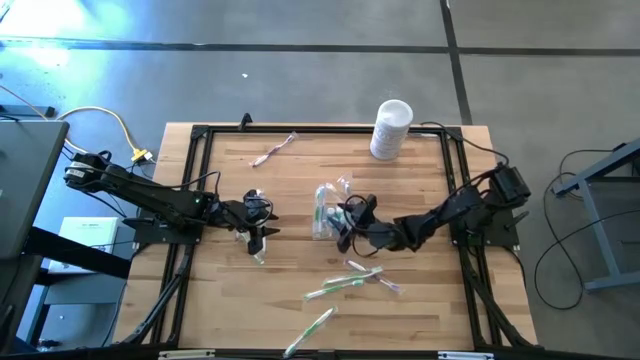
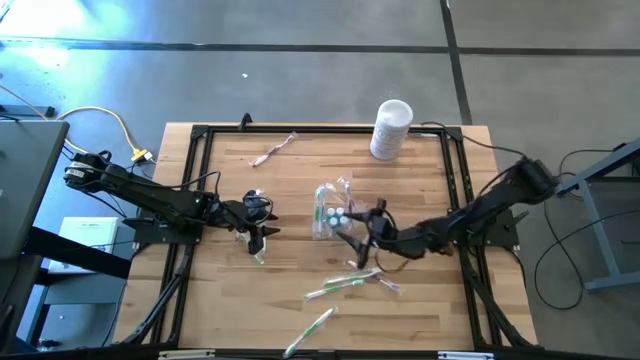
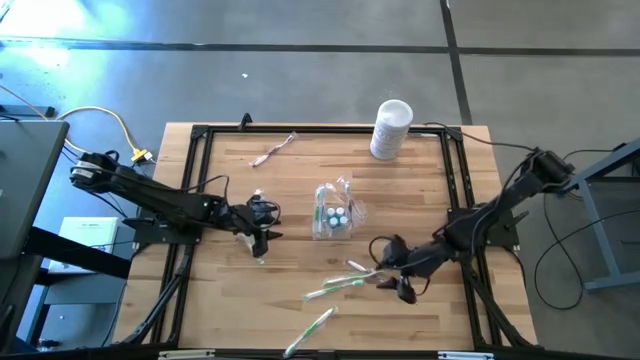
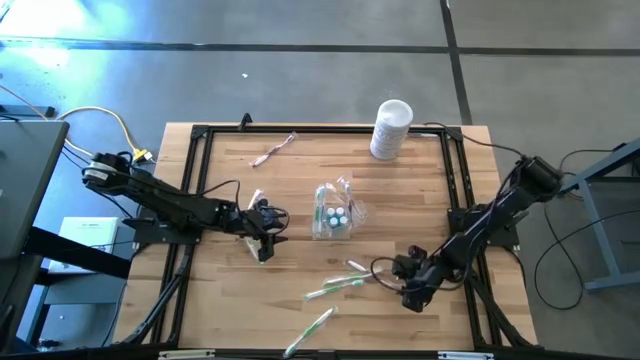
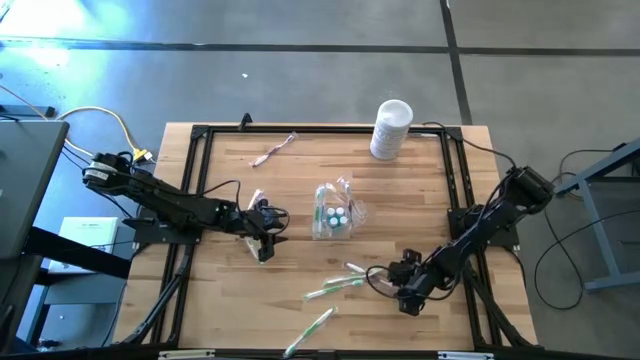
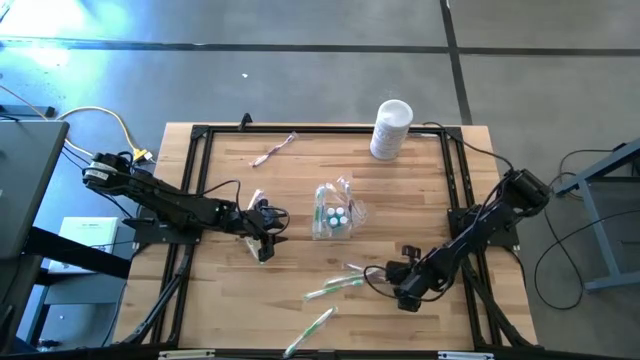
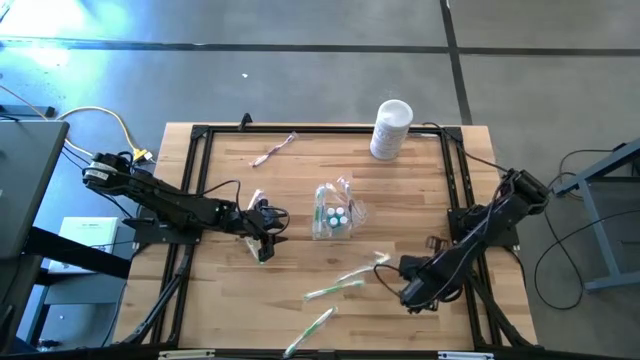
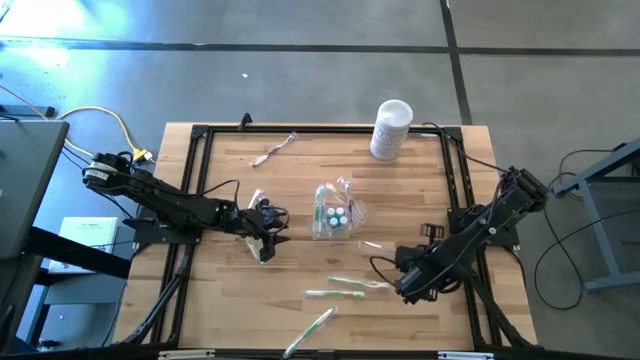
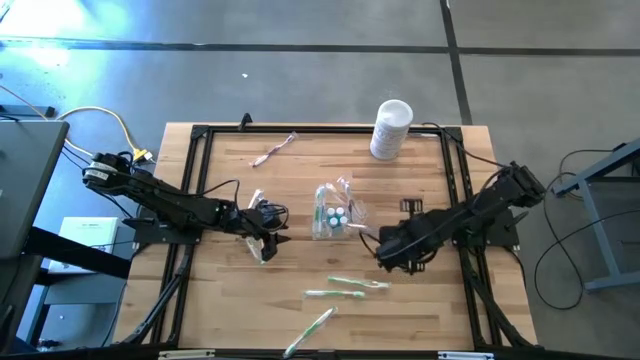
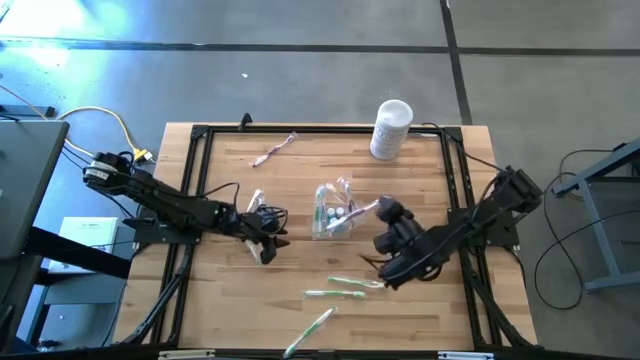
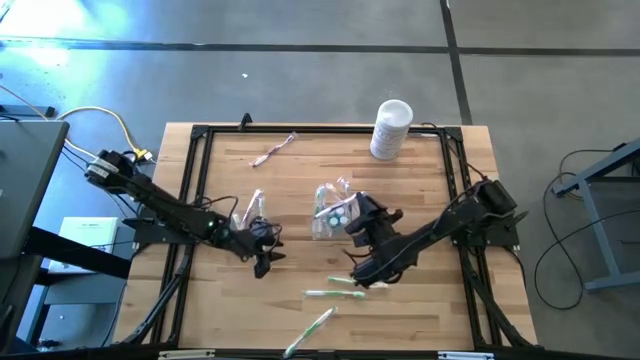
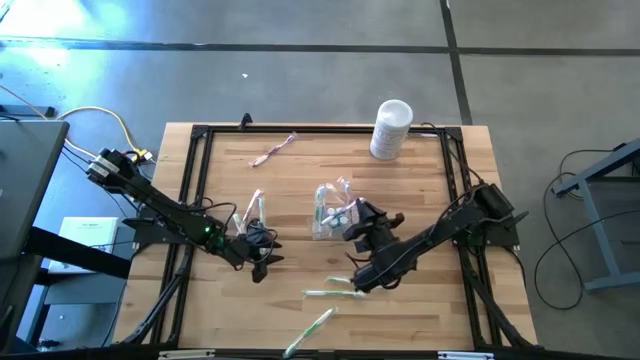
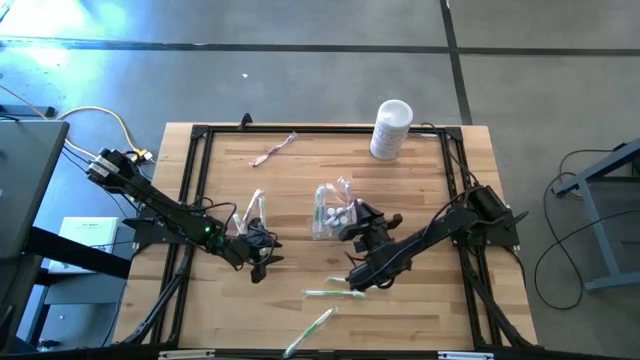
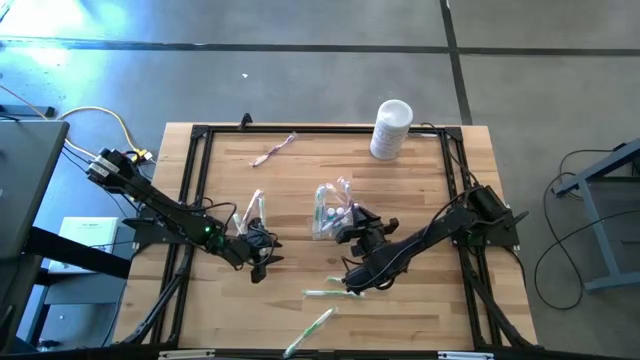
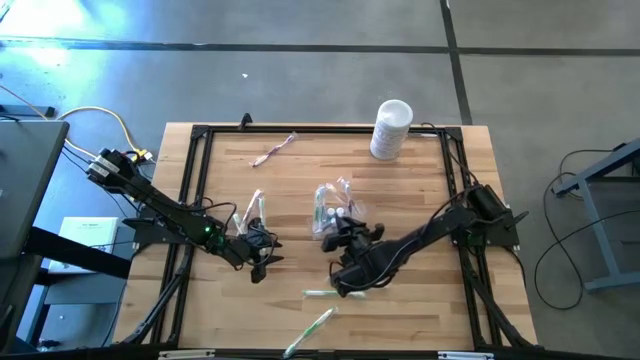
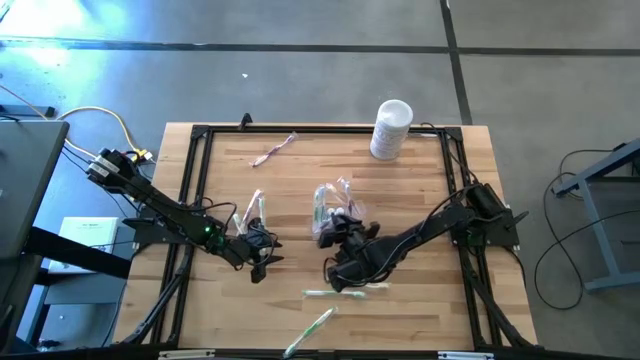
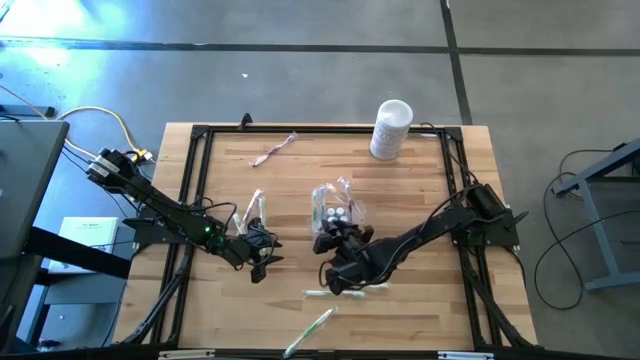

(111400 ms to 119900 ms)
Task: Pick & Place toothbrushing station
Put the violet toothbrush into the transparent organizer

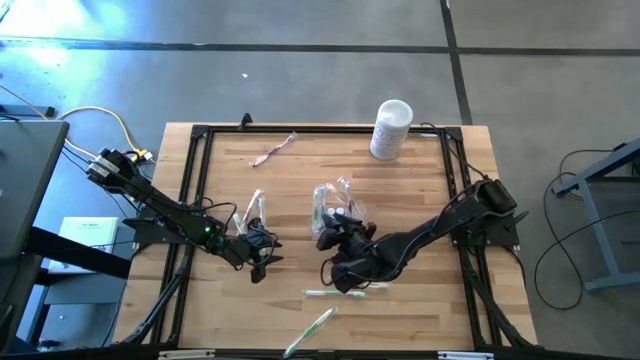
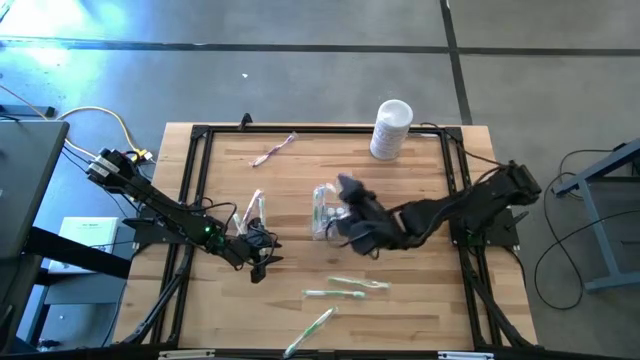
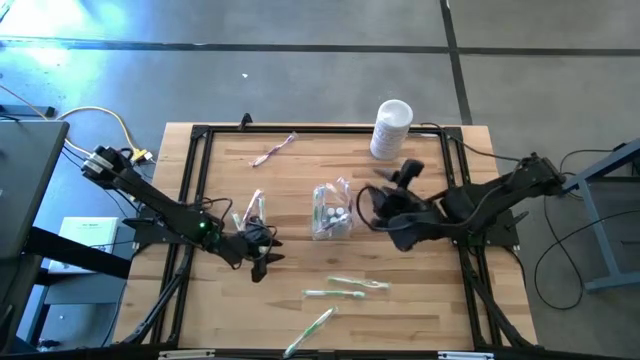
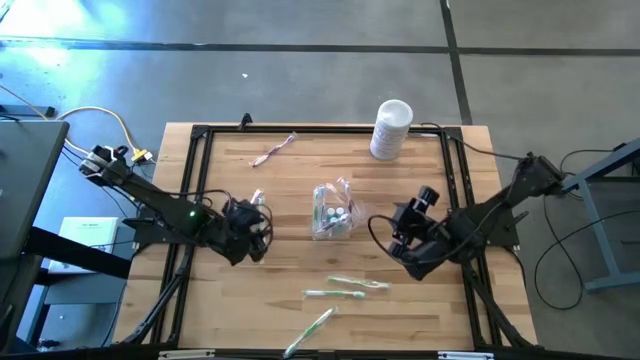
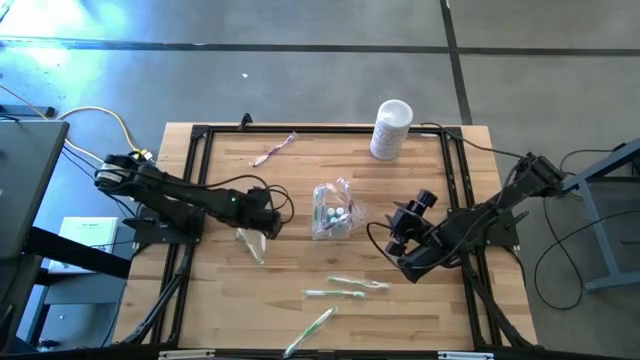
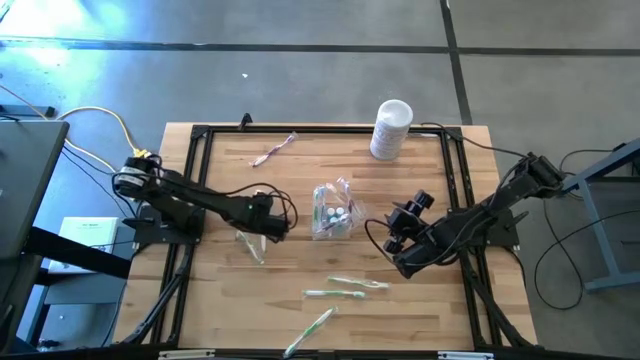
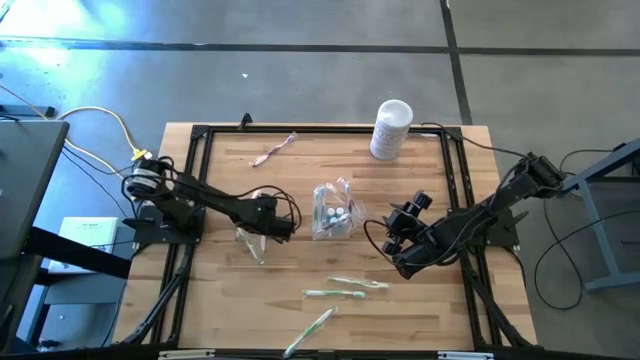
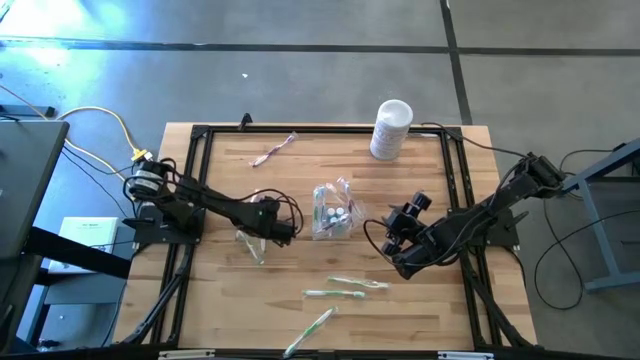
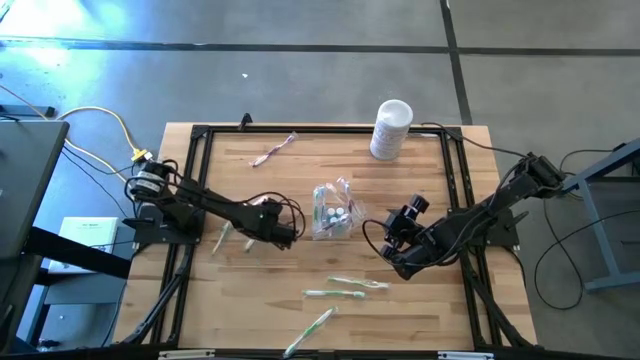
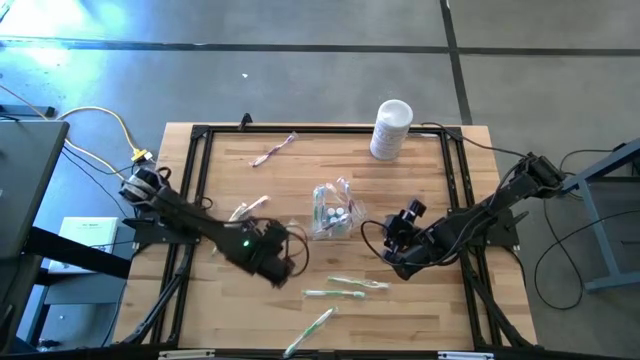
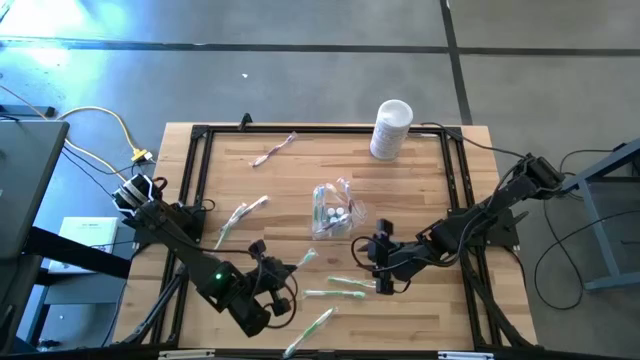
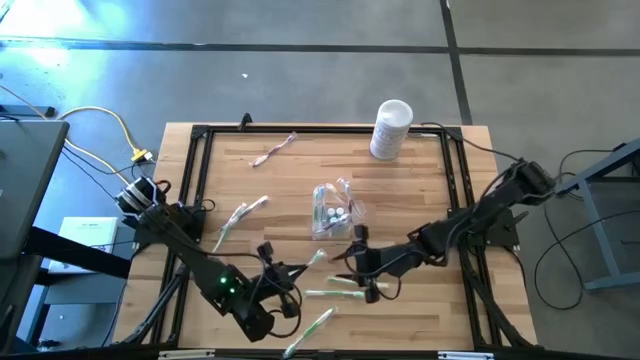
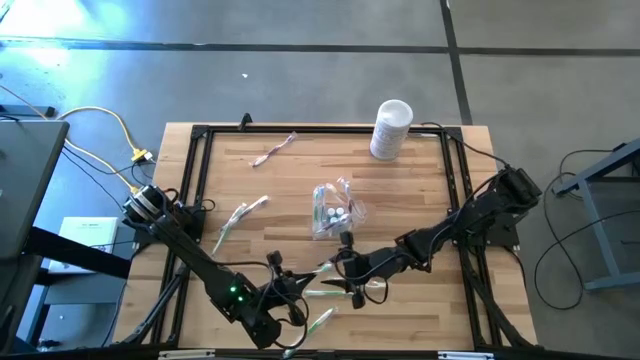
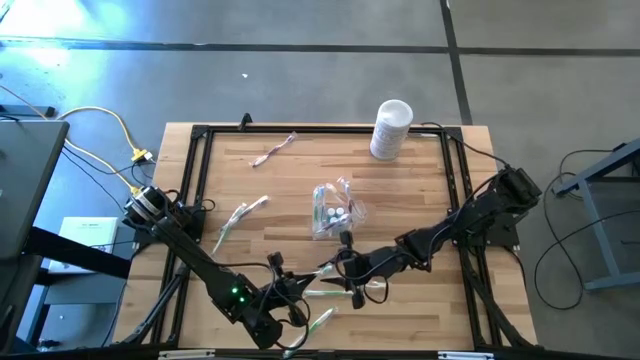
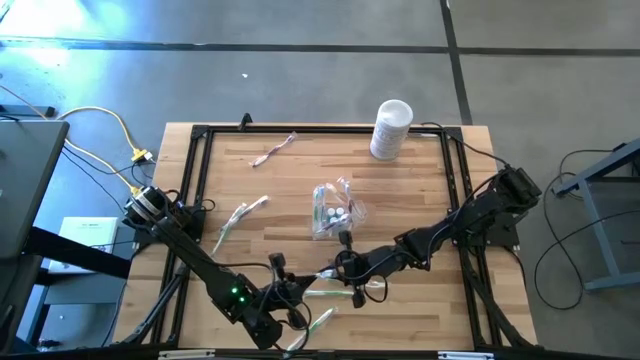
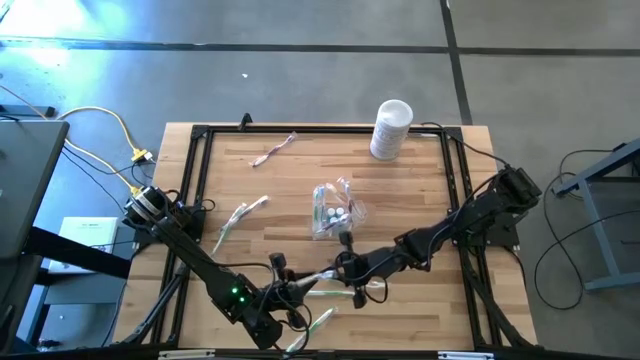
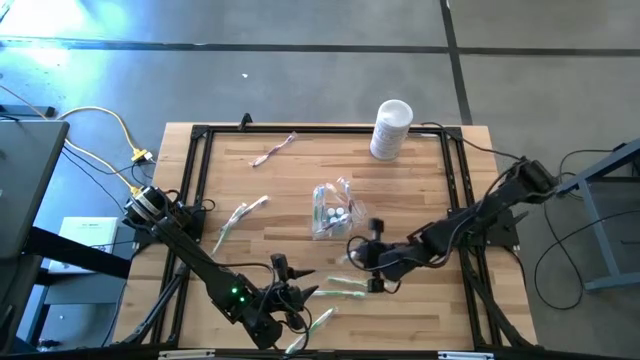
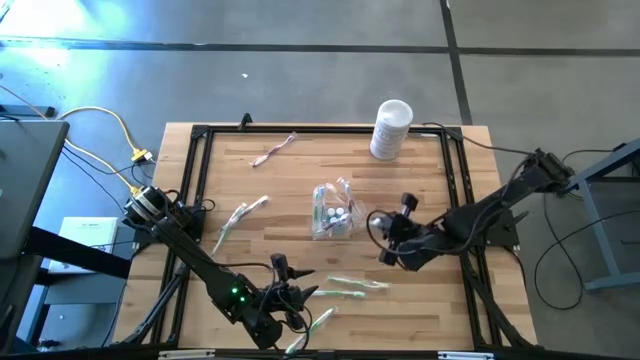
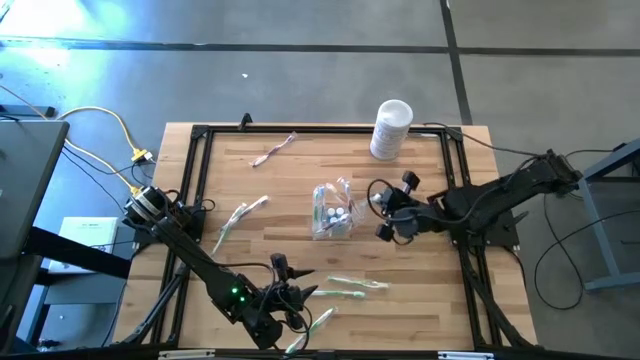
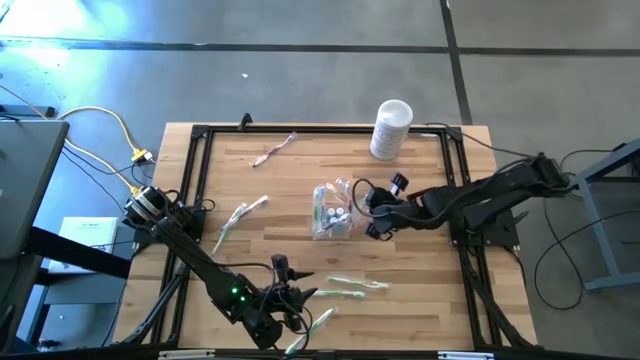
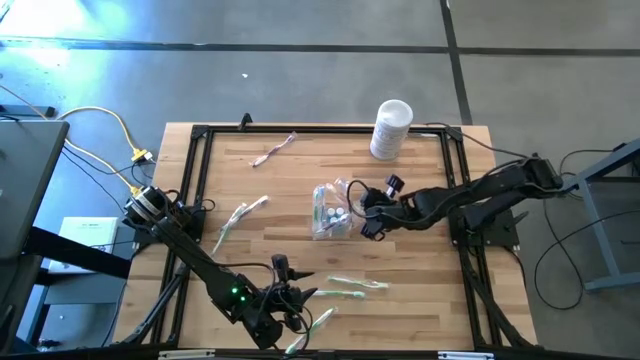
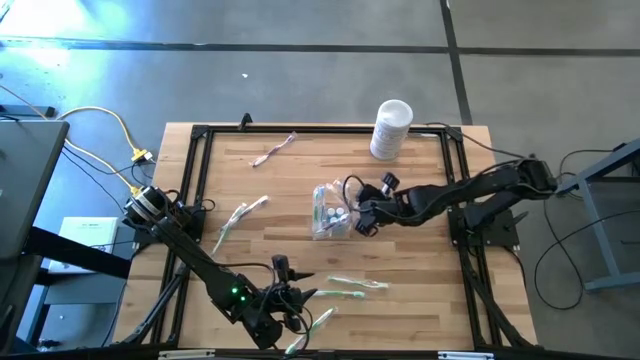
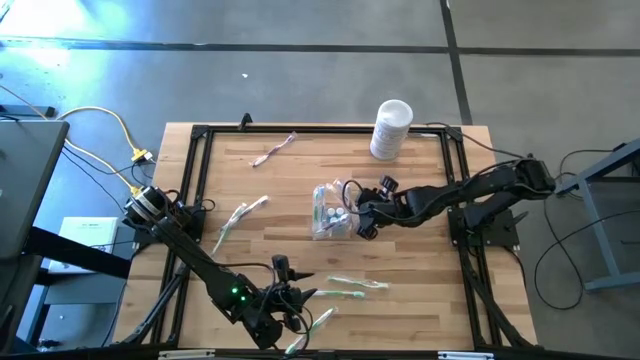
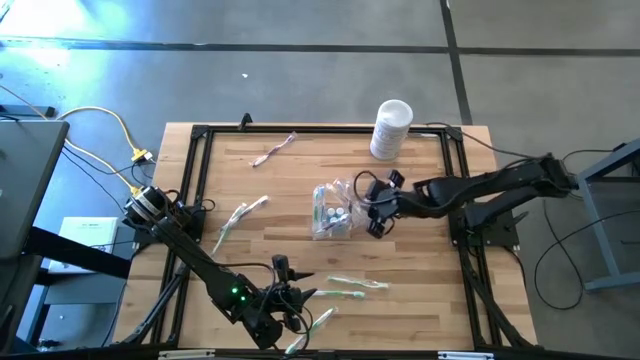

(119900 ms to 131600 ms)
Put the green toothbrush into the transparent organizer

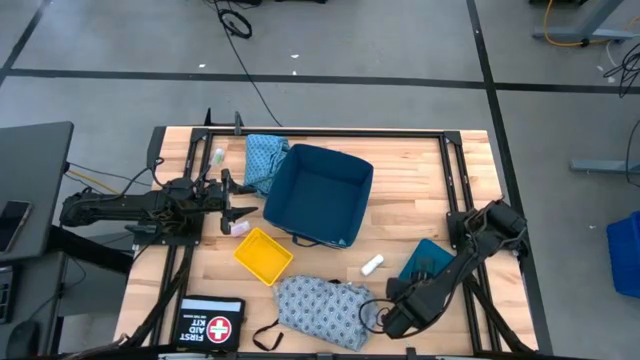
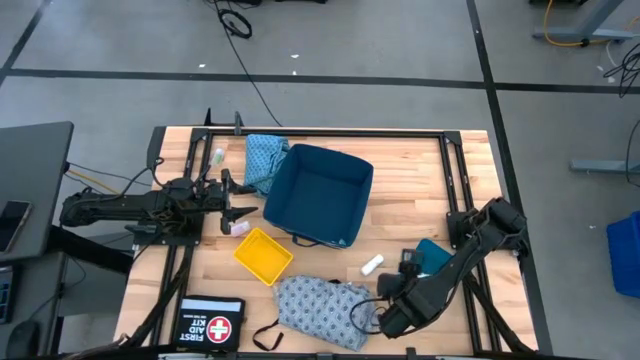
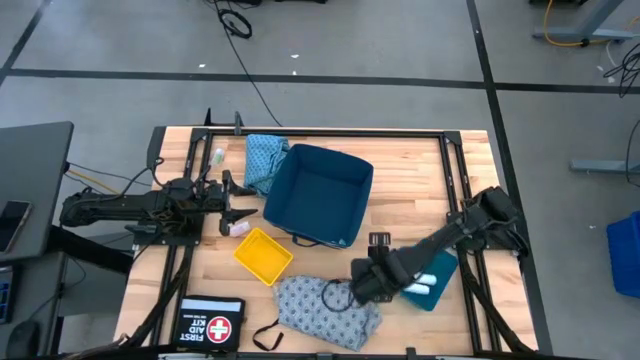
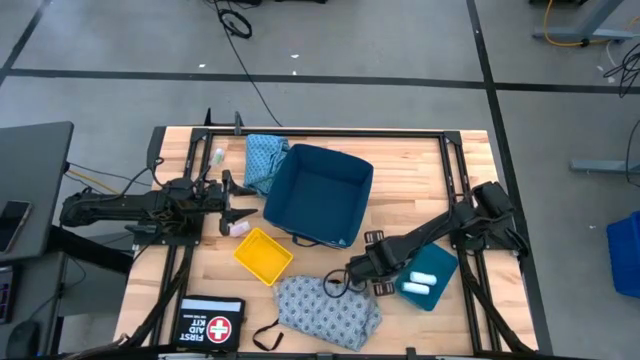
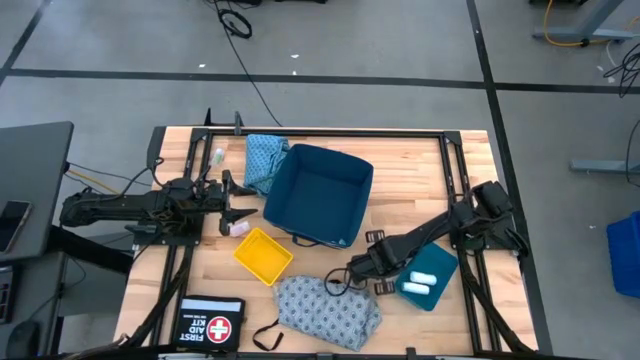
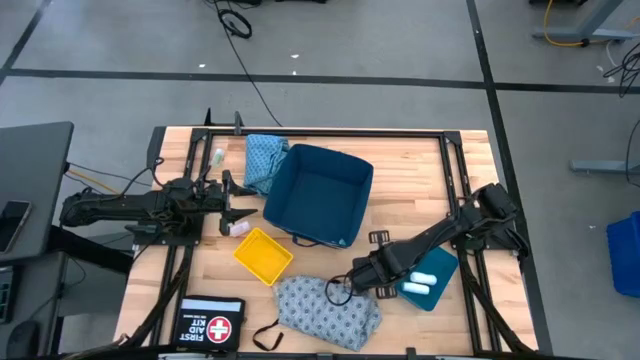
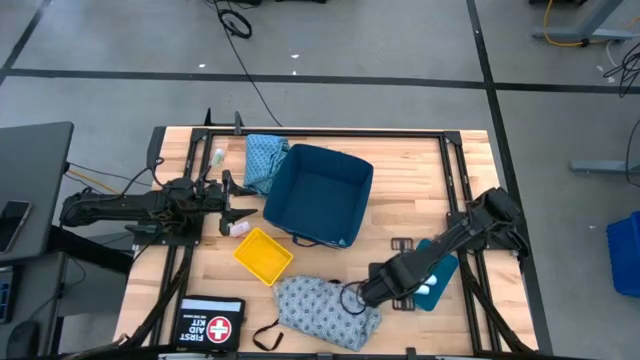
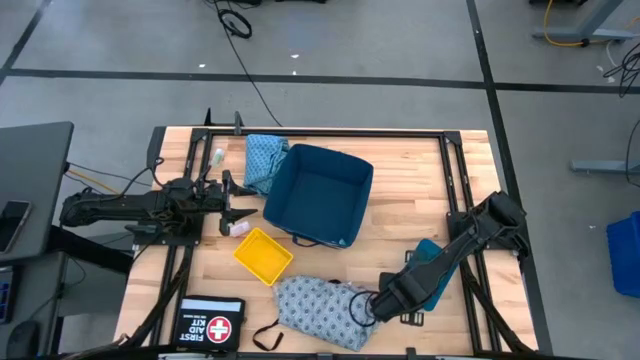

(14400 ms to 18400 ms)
Task: Pick & place medical supplies in basket/bin
Put the white bandage into the blue bin
